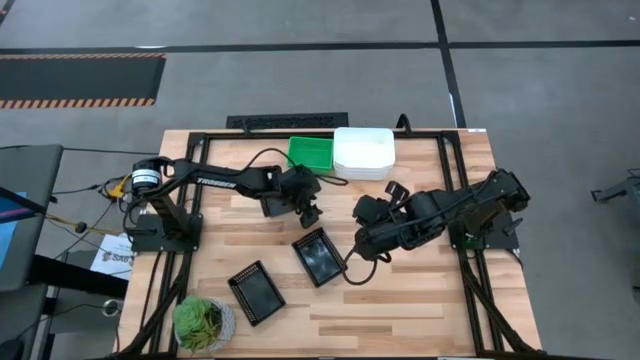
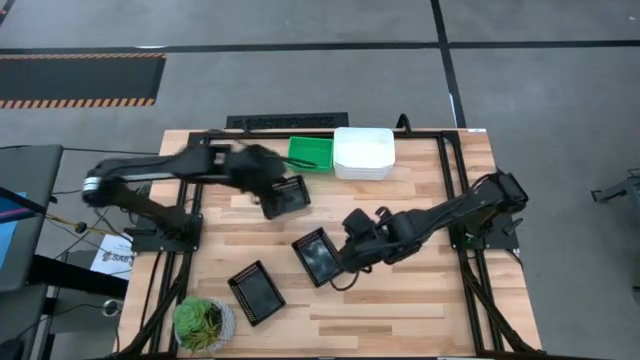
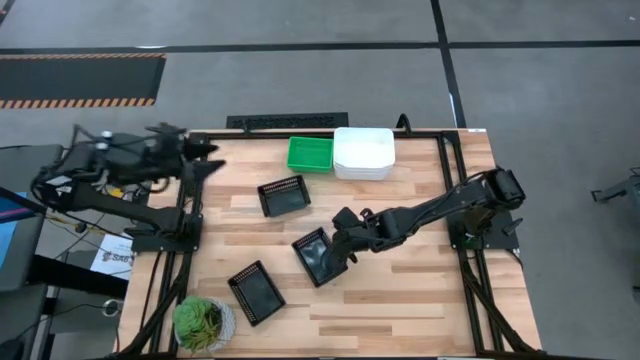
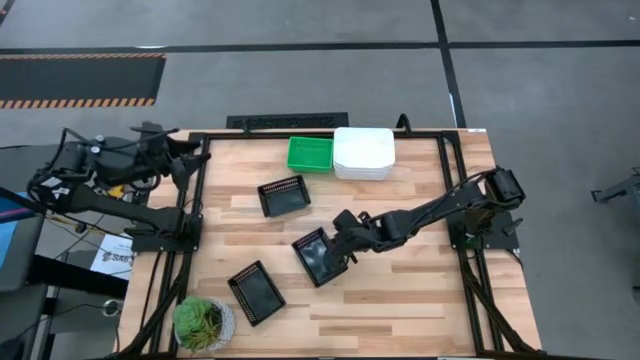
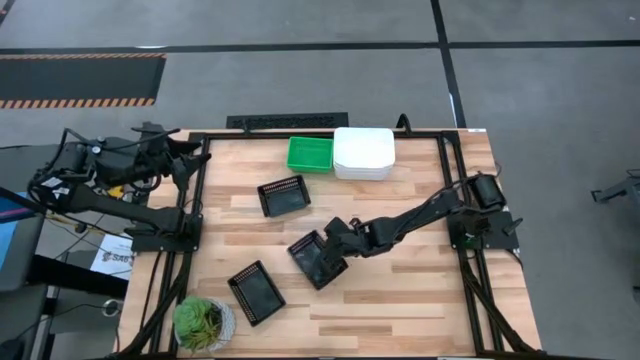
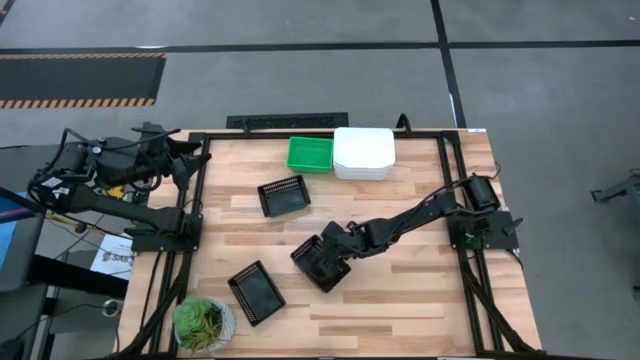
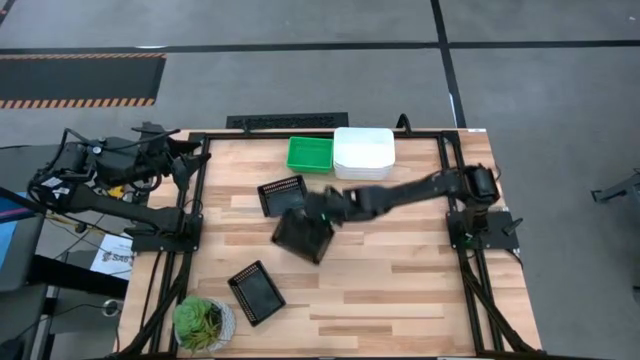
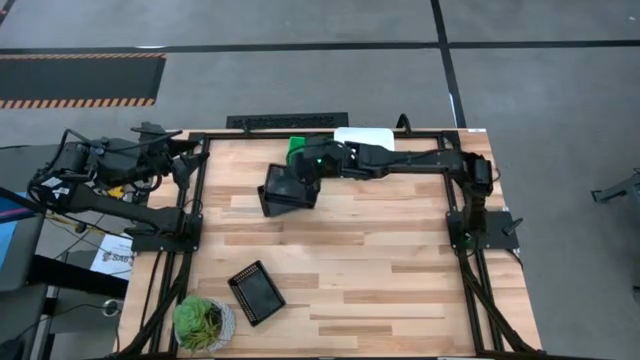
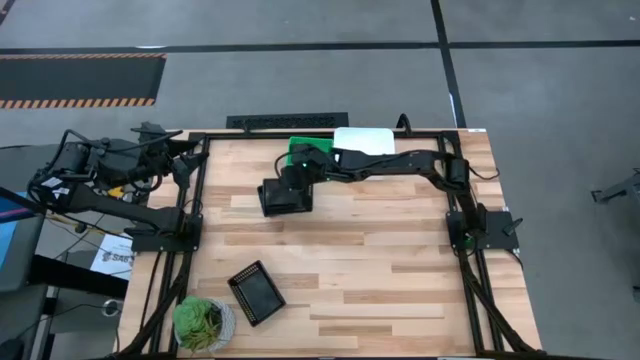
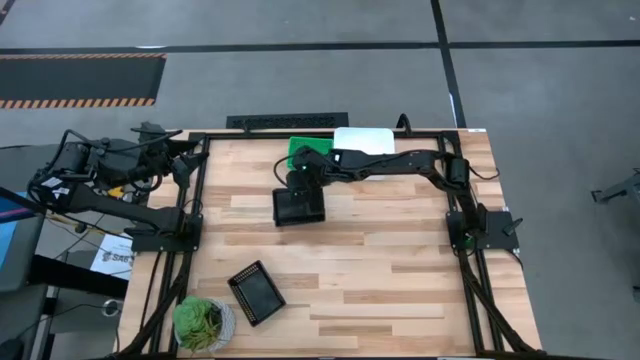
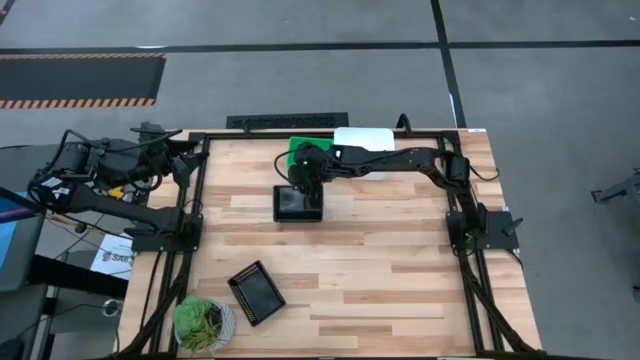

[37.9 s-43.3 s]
Stack the center black bin on the top black bin

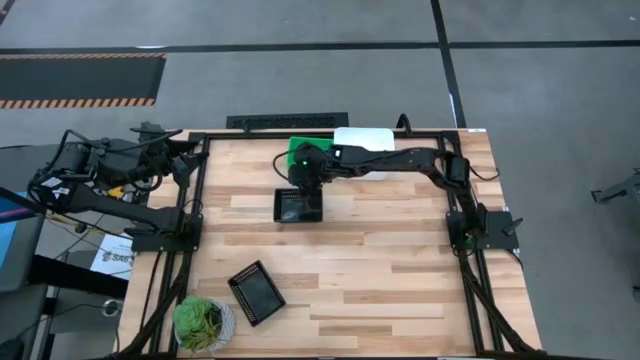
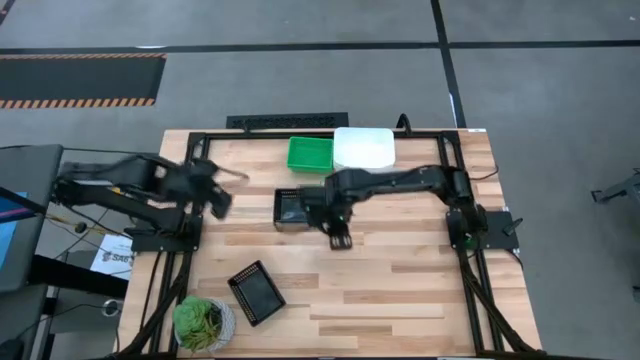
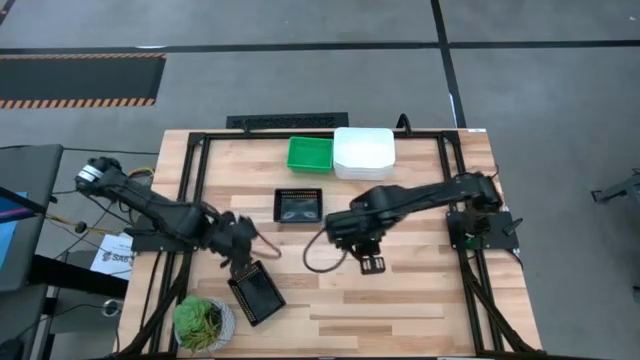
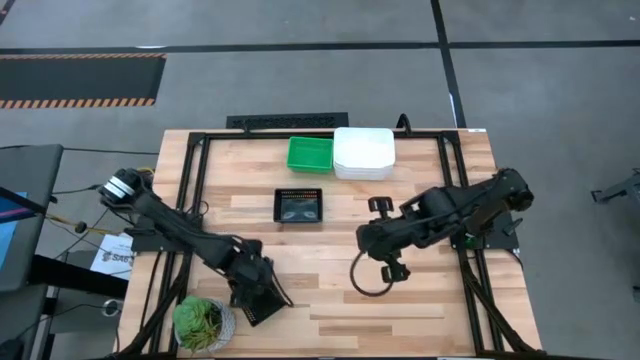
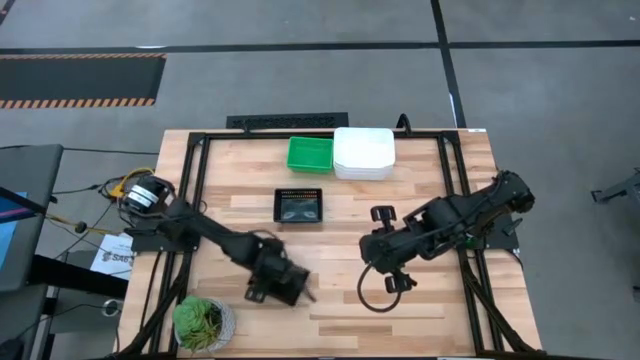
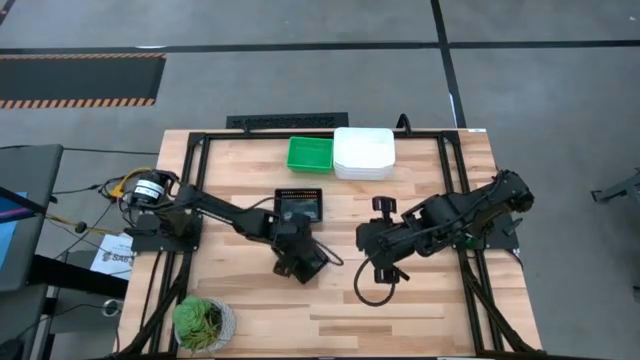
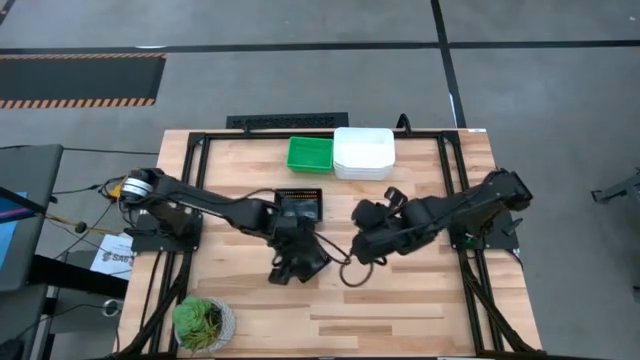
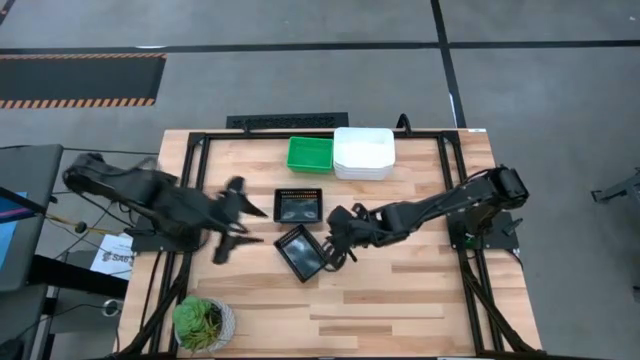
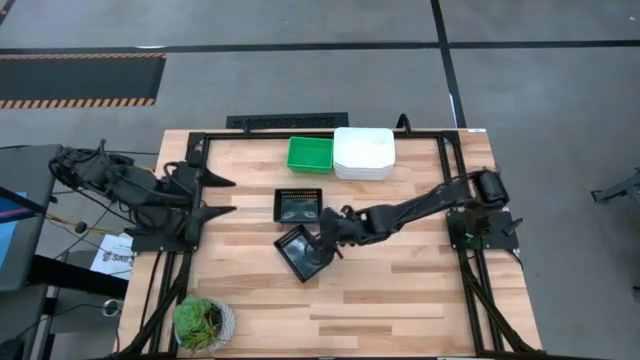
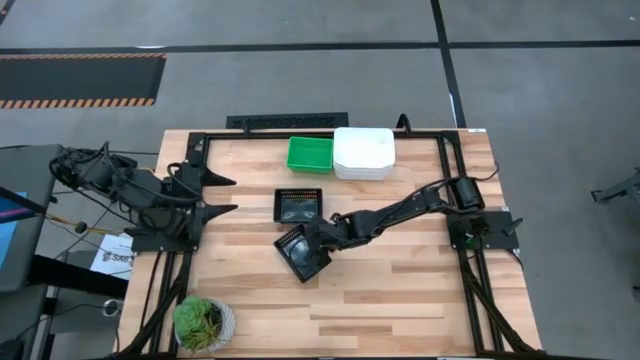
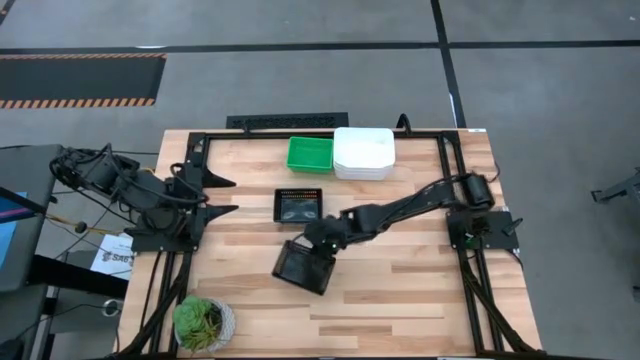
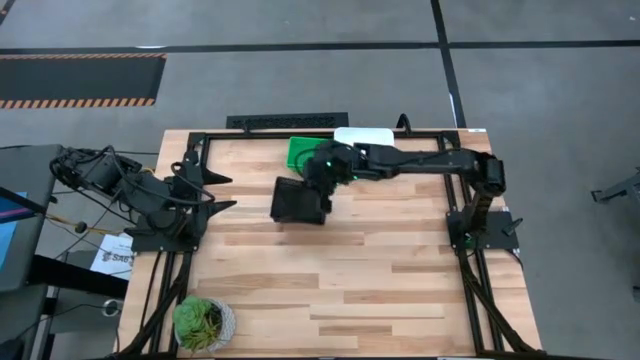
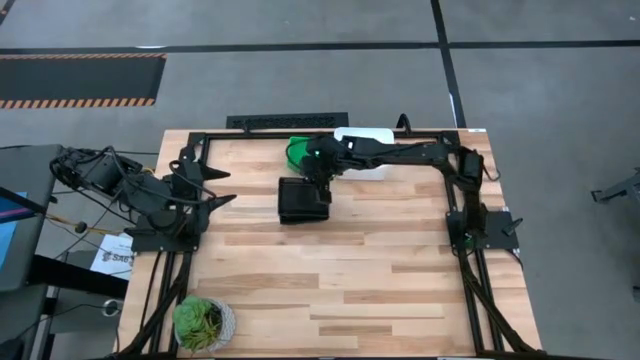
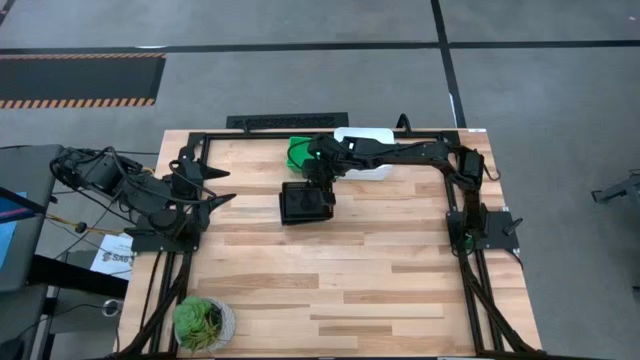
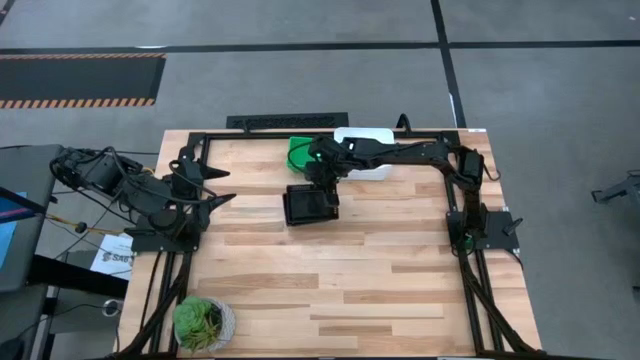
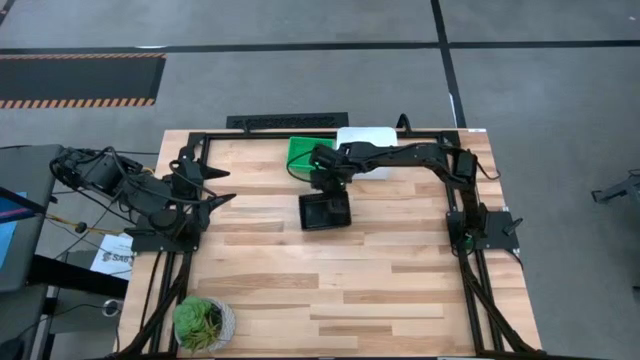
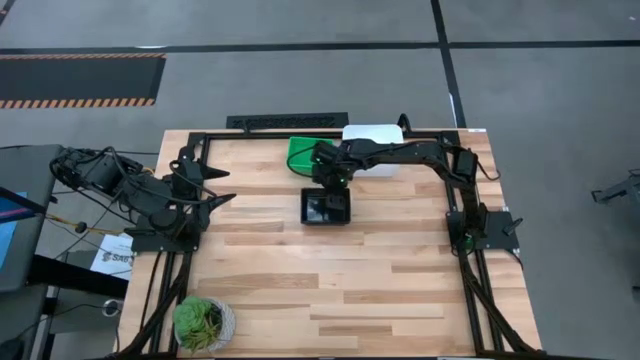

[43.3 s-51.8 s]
Stack the bottom black bin on the black bin

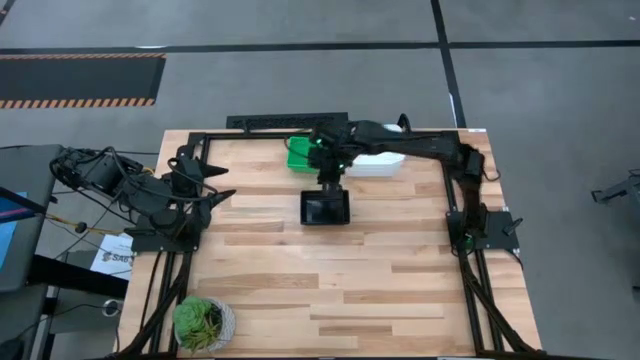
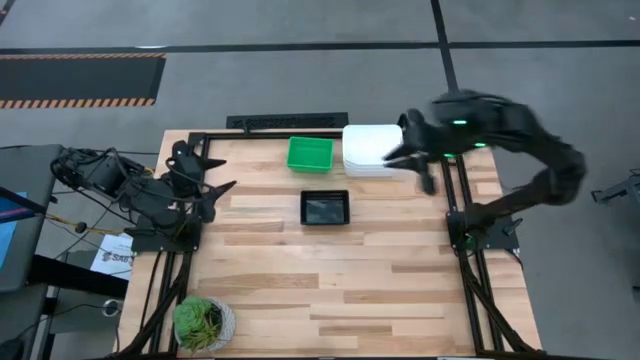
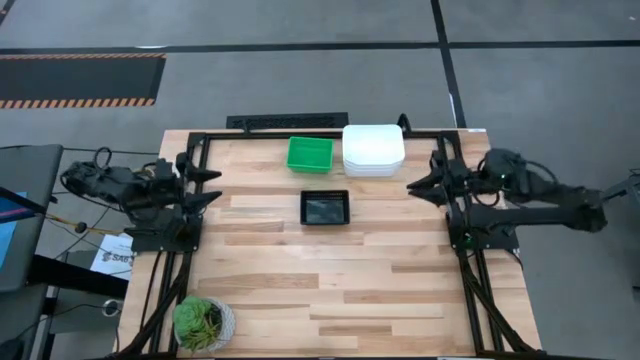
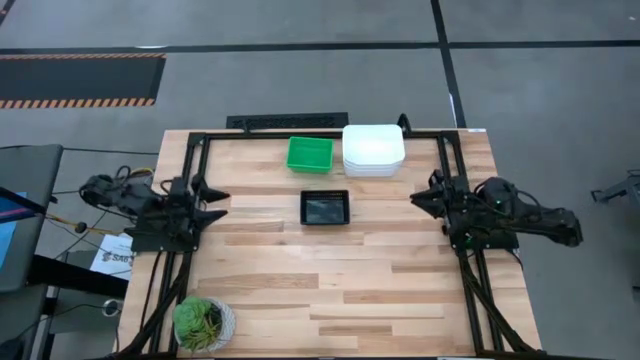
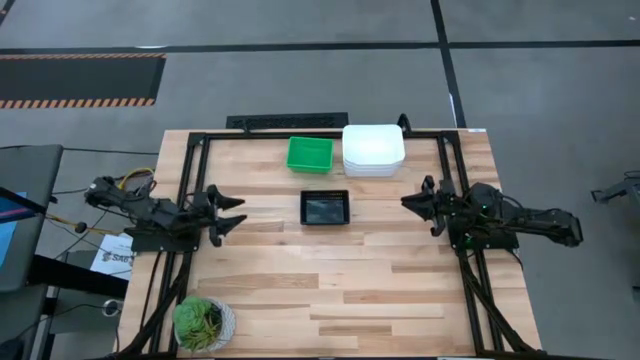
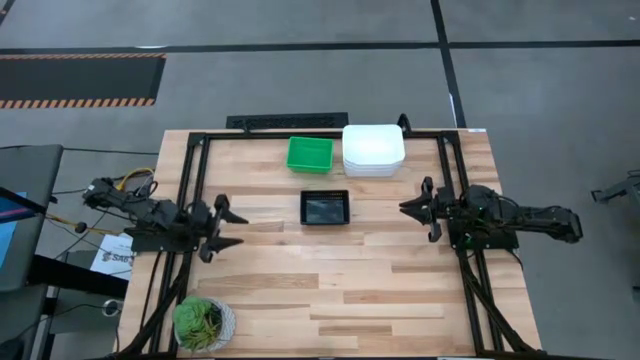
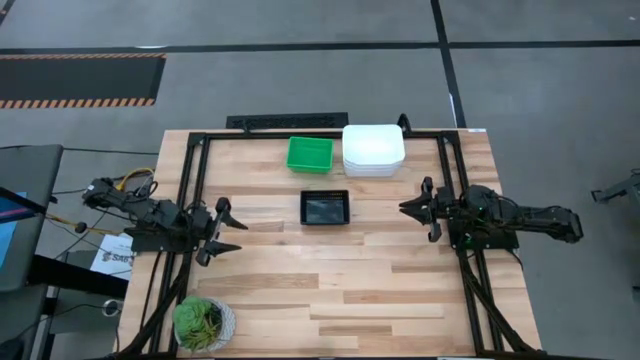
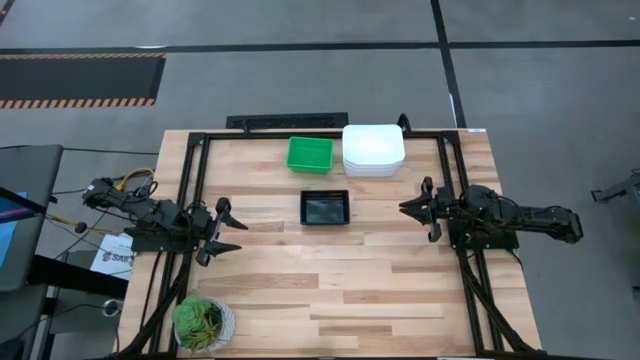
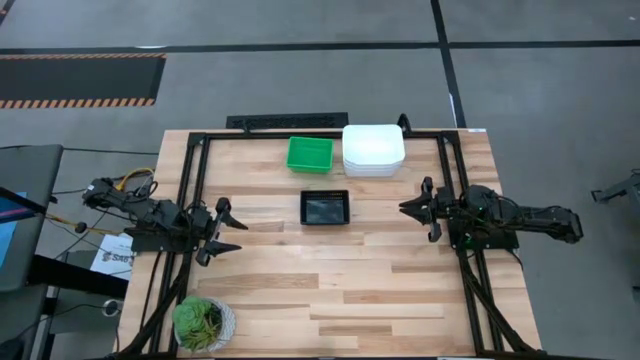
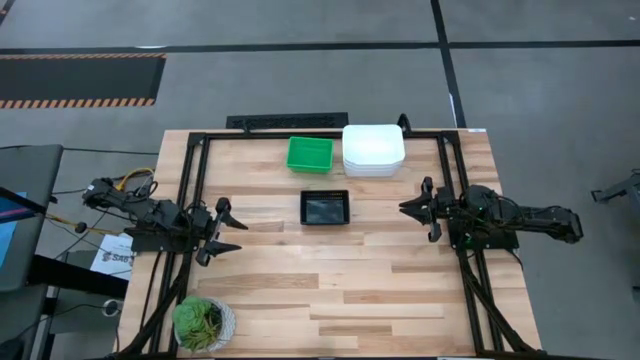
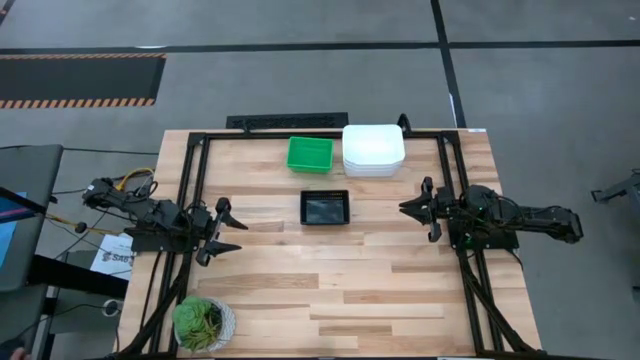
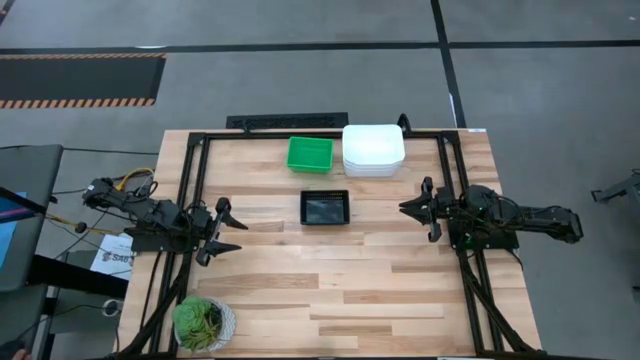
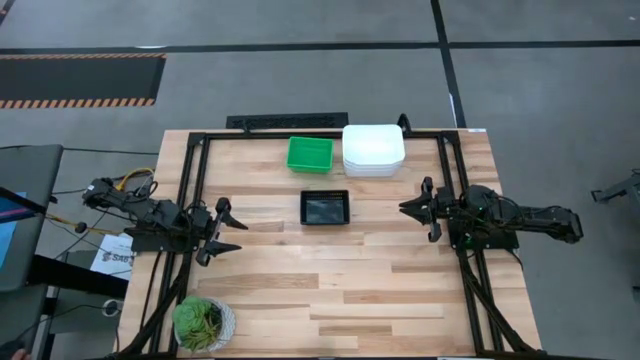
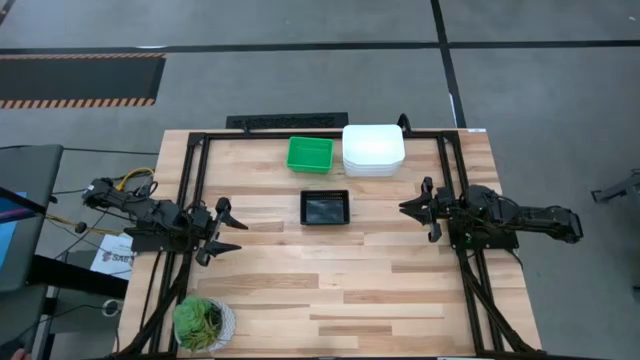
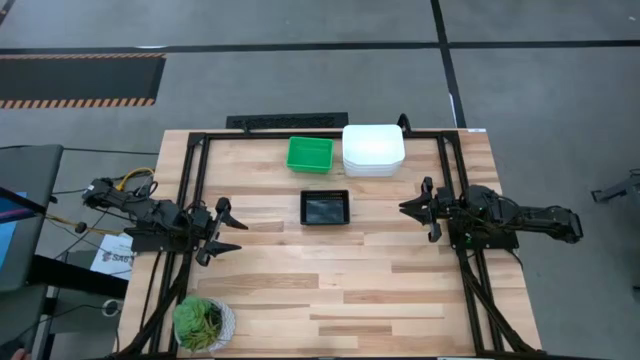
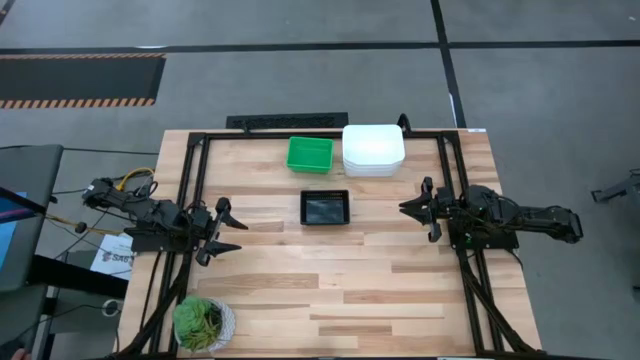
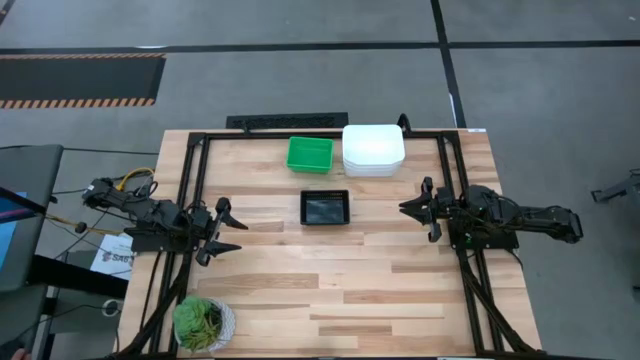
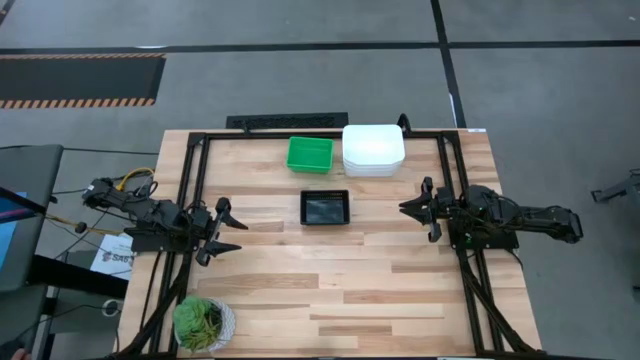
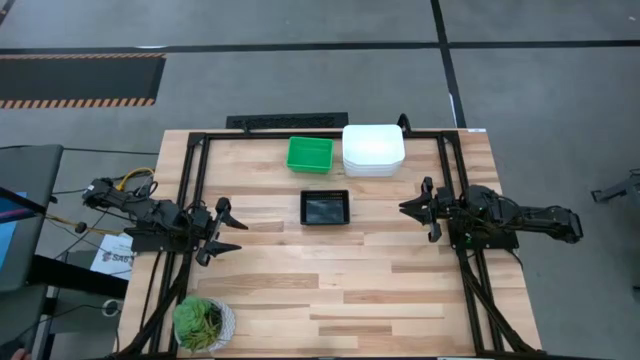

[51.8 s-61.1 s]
Return to Home Position
